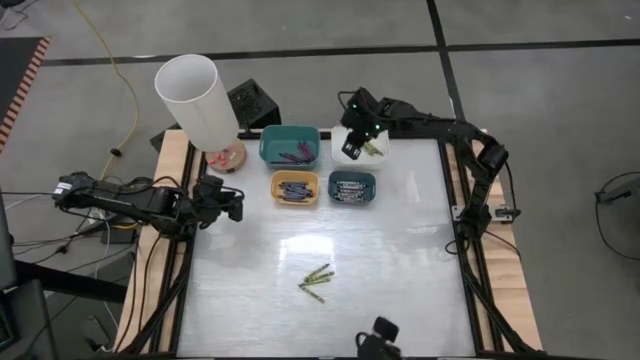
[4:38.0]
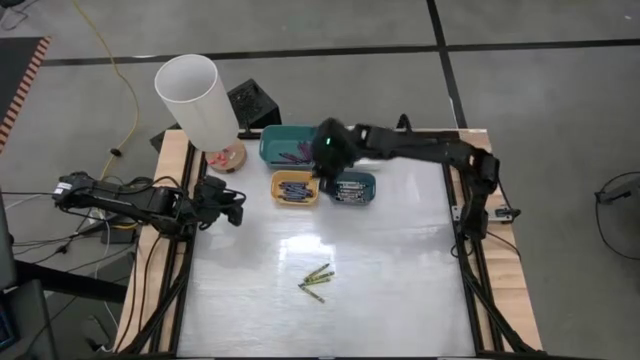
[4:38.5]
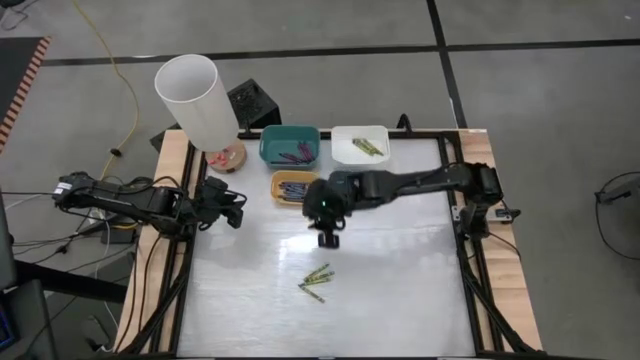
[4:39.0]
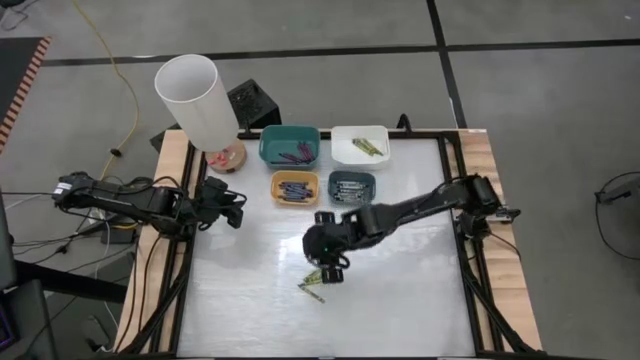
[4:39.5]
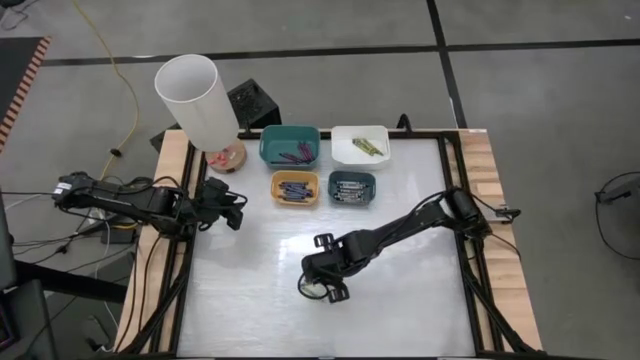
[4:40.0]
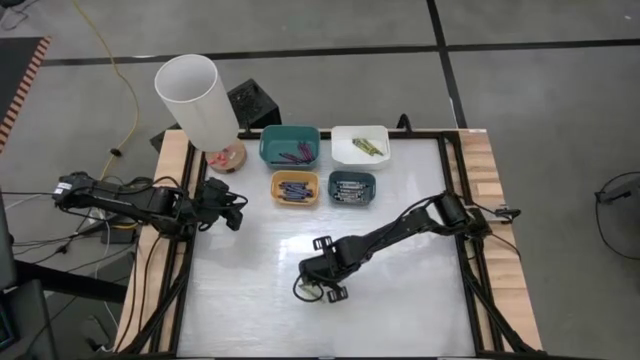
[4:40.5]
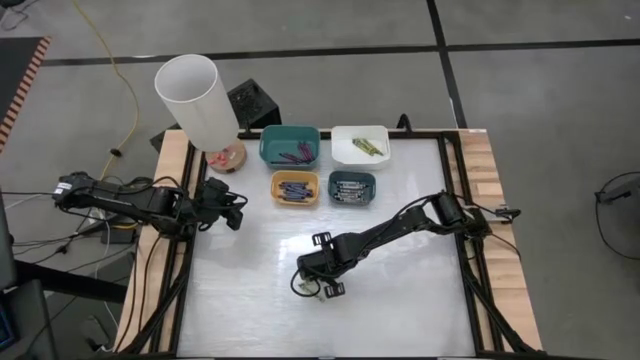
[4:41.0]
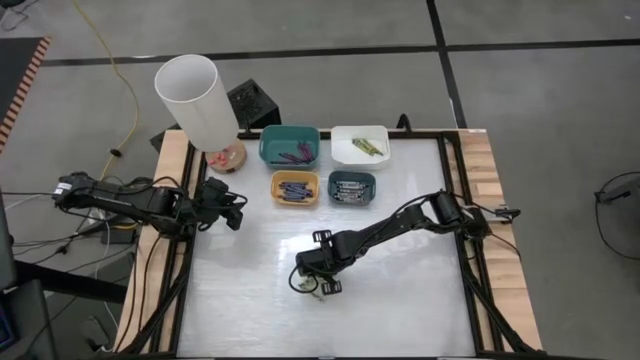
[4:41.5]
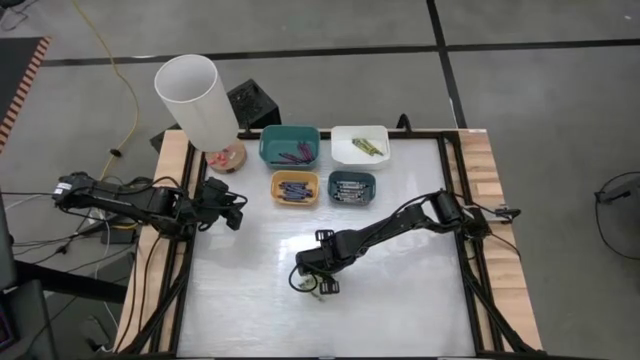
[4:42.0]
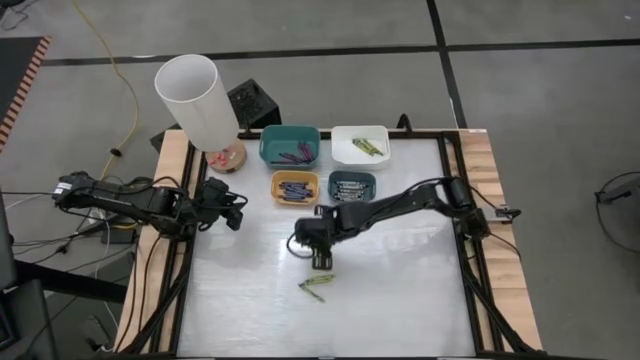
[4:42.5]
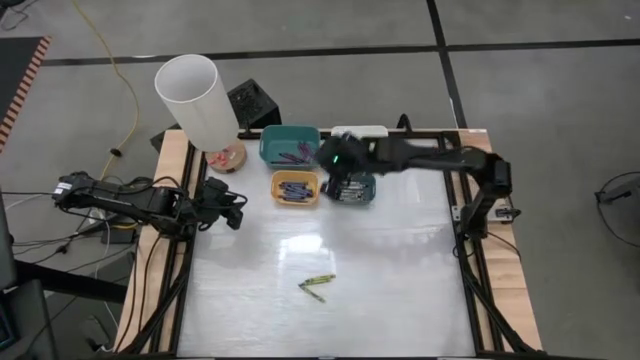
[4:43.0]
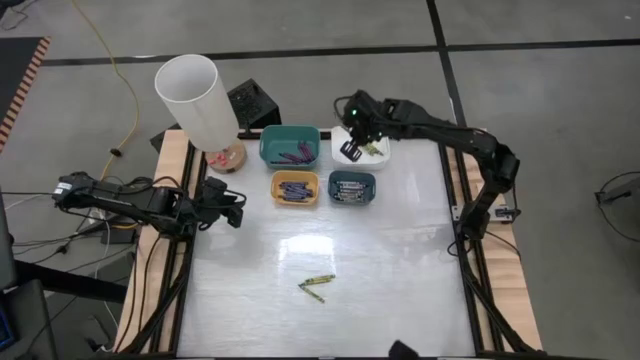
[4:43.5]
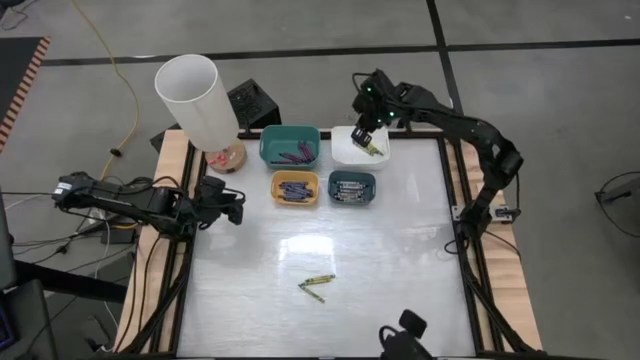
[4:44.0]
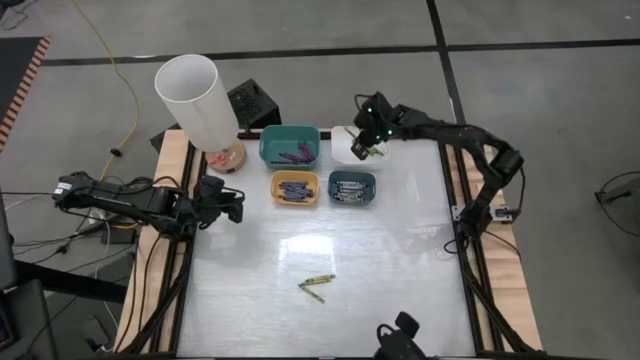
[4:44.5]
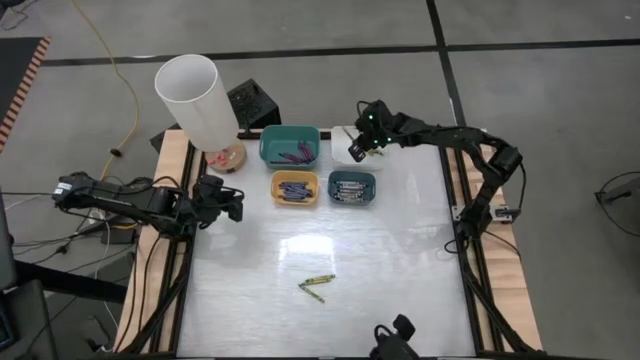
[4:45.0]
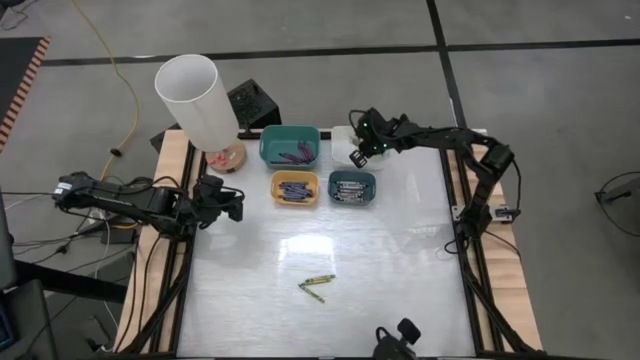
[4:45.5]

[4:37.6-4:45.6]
Task: Sort crayons
Put the green crayon into the white bin

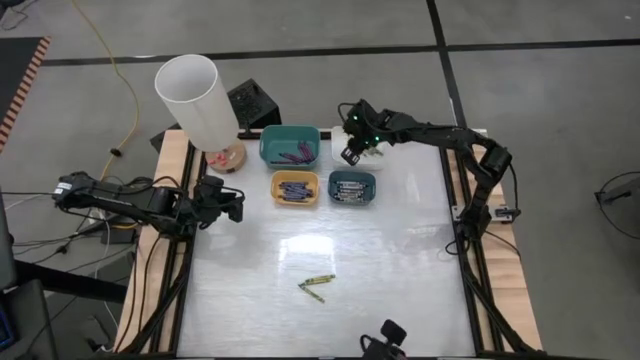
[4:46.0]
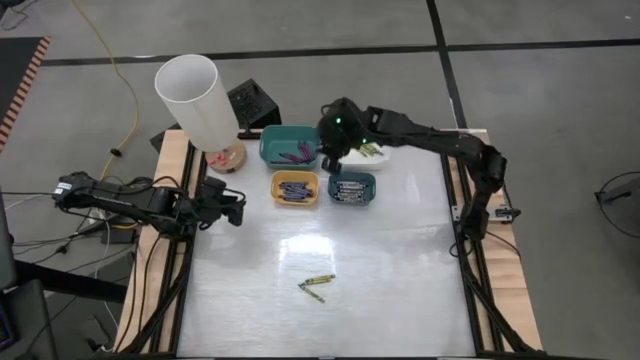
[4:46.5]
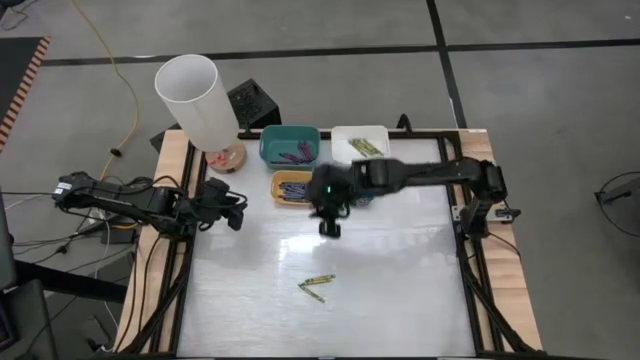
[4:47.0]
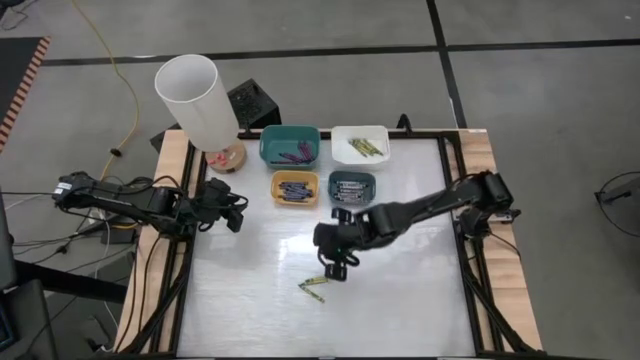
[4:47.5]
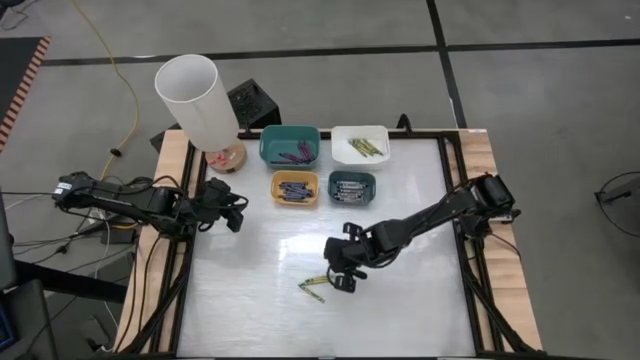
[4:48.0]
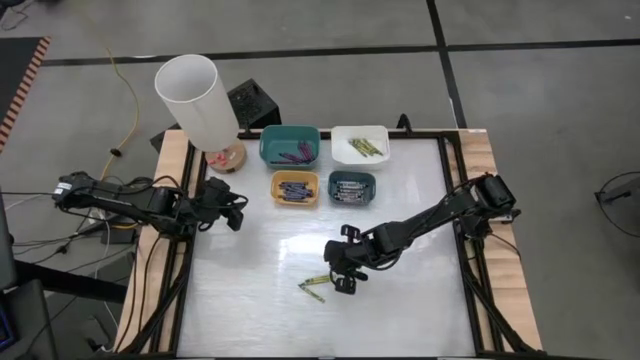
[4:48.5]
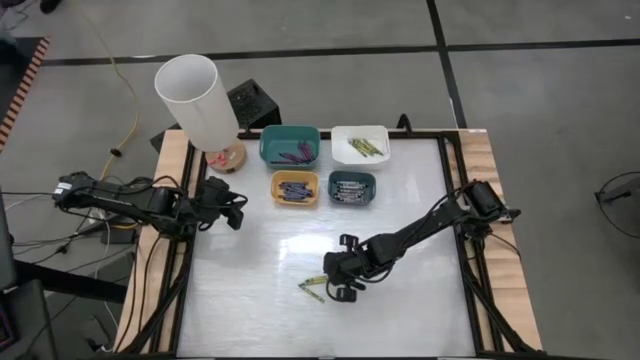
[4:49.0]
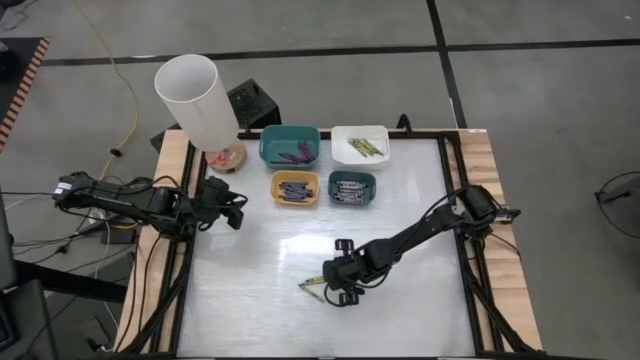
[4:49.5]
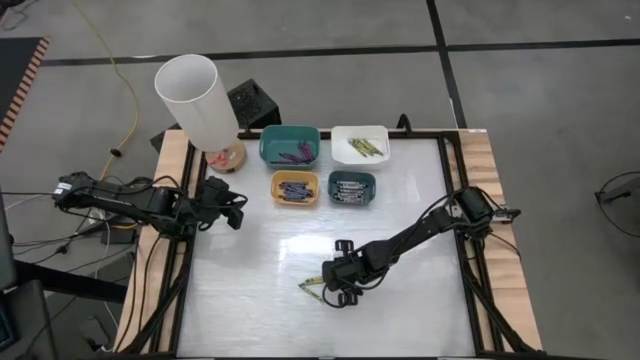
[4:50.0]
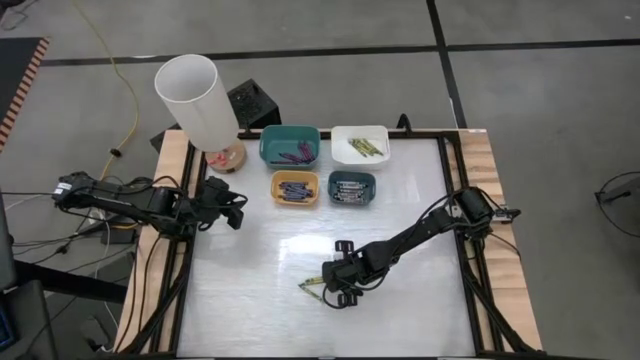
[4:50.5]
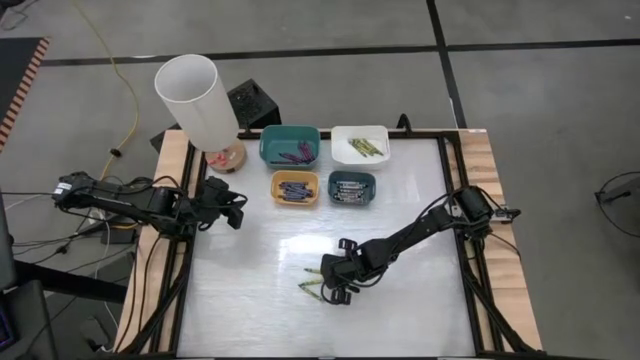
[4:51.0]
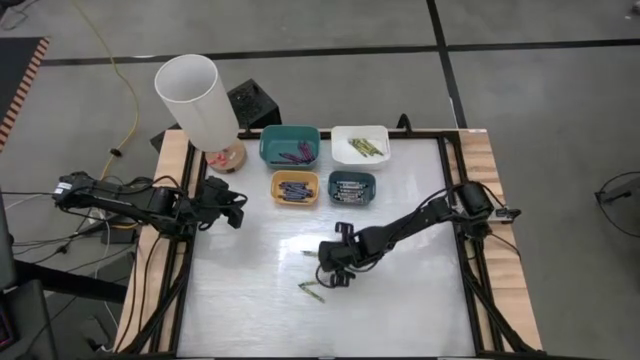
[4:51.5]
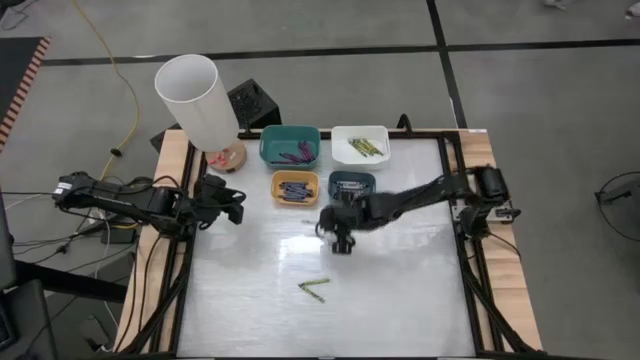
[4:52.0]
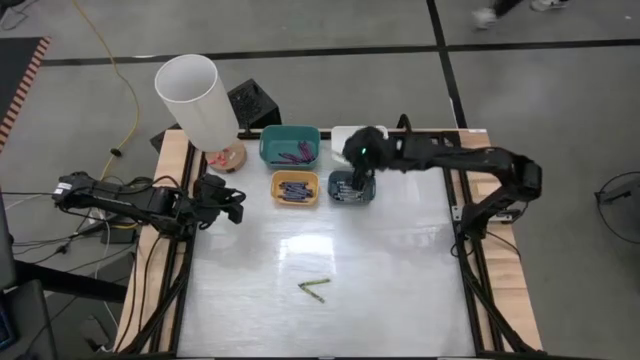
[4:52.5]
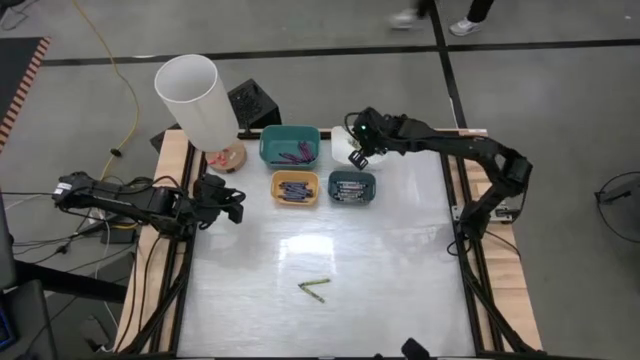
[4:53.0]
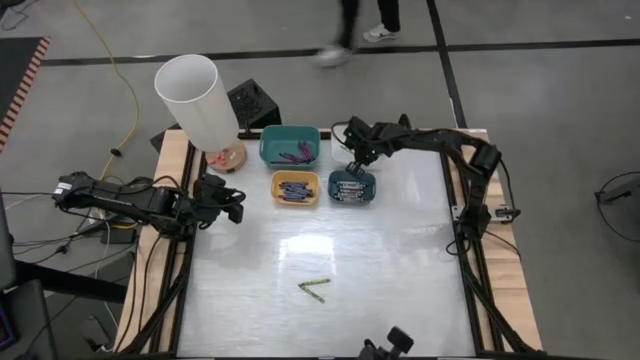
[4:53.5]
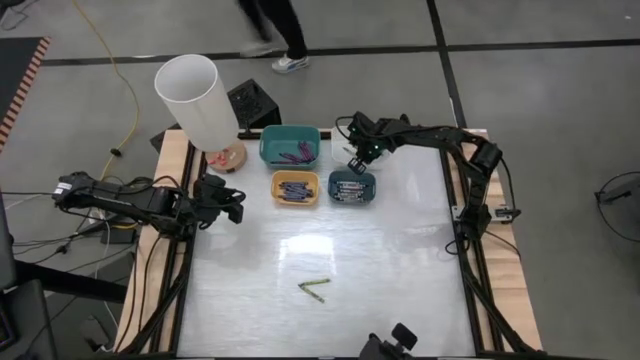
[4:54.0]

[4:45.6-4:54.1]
Put the green crayon into the white bin

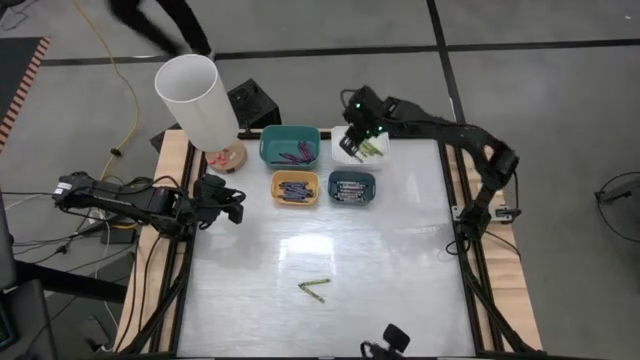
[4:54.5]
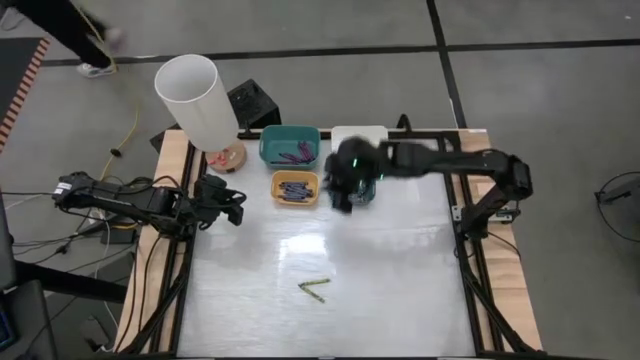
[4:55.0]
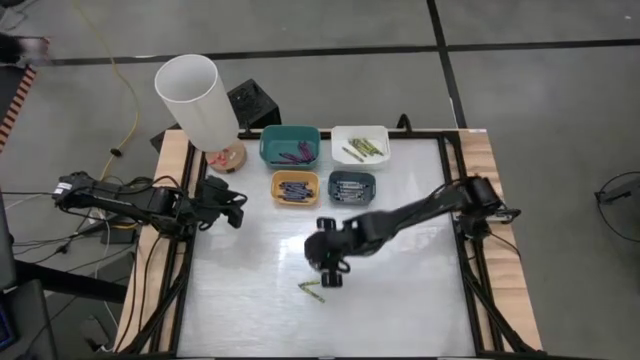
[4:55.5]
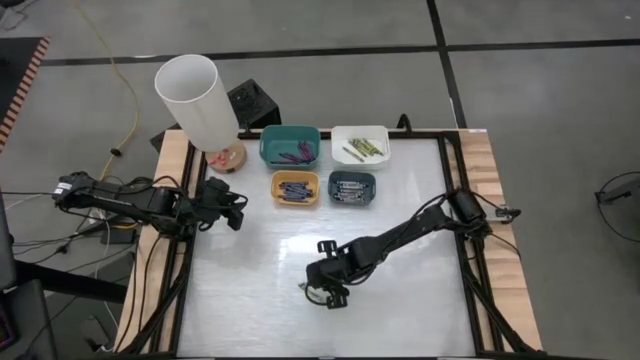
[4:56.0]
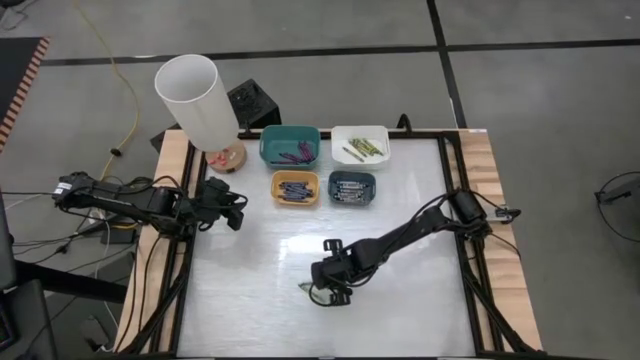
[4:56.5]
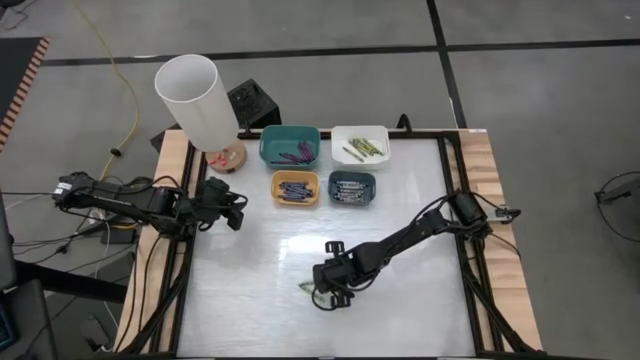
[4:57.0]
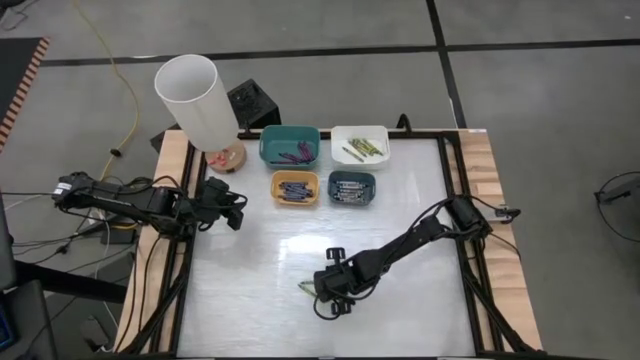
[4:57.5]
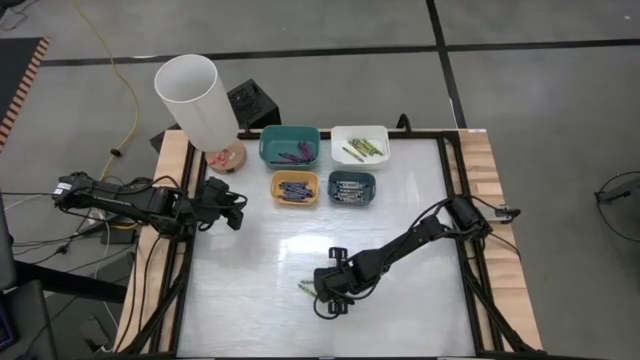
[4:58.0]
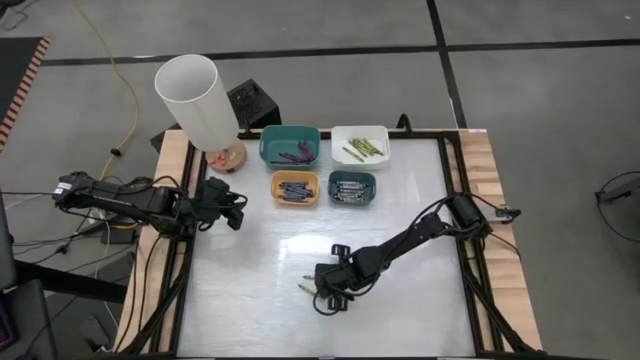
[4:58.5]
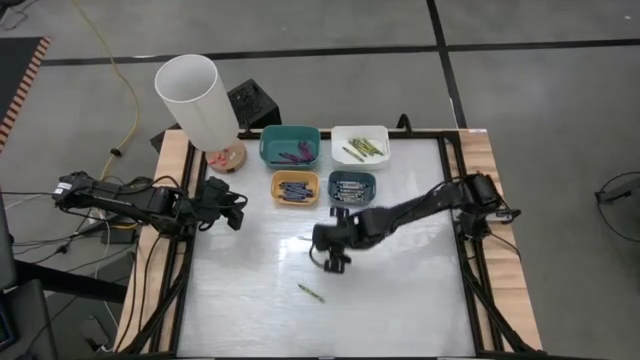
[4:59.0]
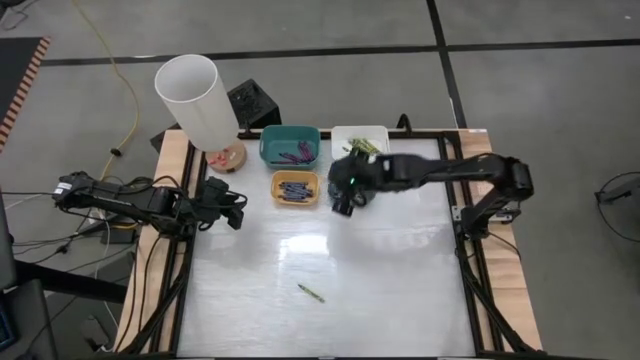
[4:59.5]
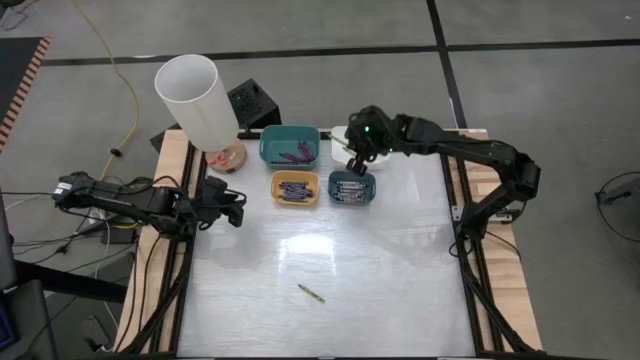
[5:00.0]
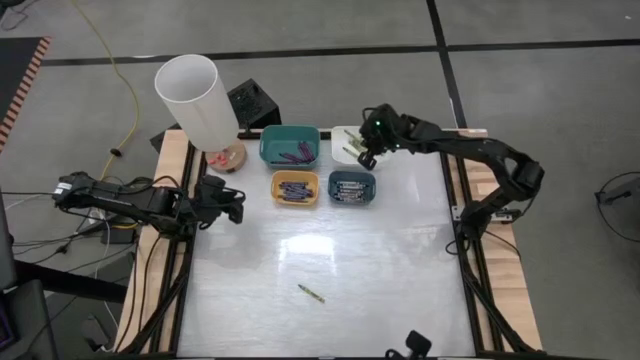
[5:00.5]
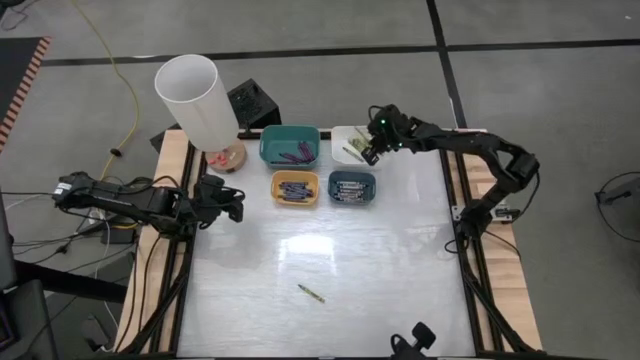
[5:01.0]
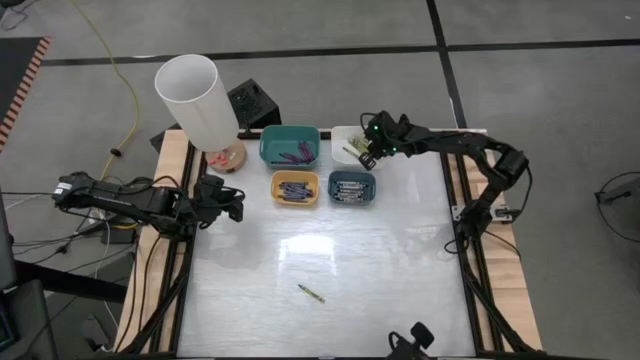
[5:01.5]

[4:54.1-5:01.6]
Put the green crayon into the white bin
